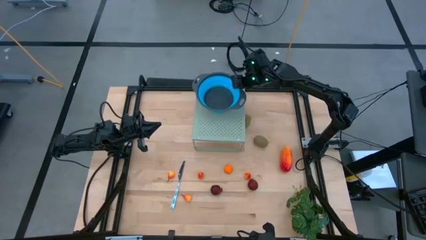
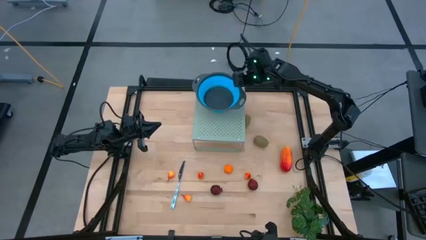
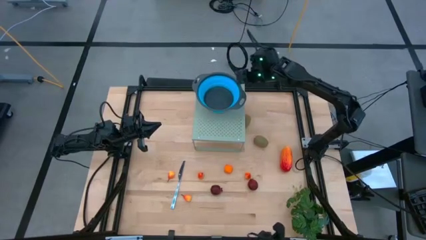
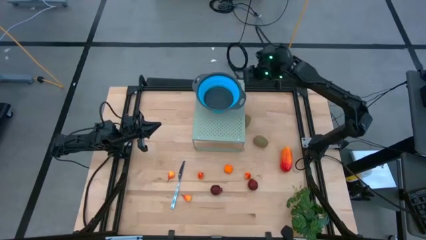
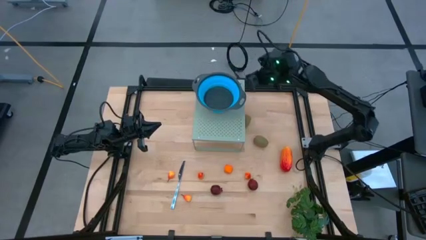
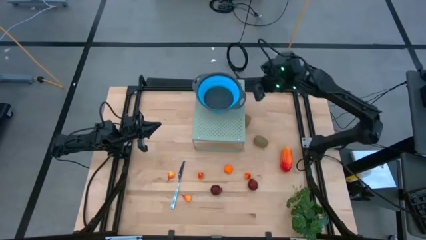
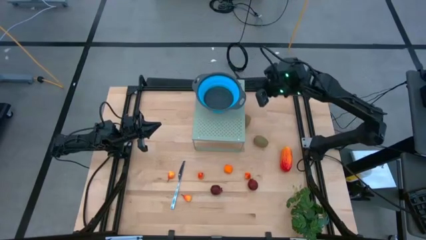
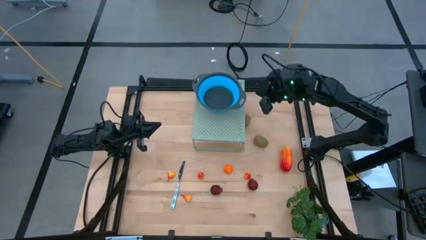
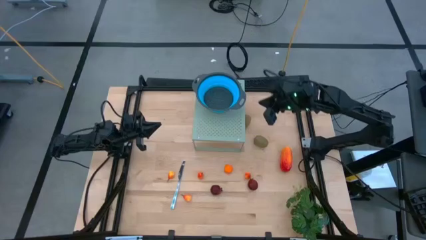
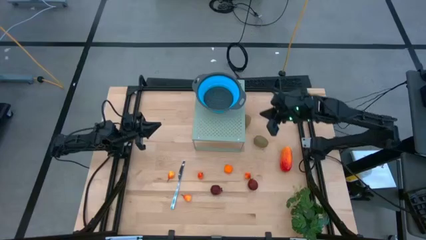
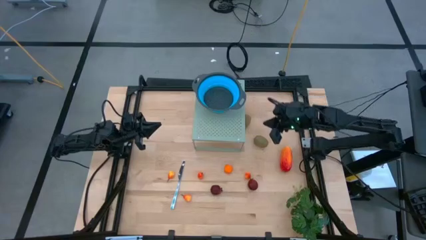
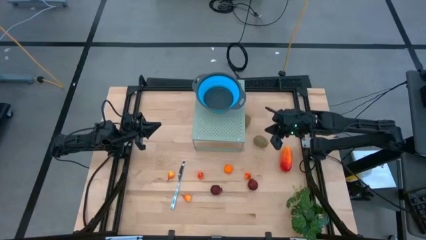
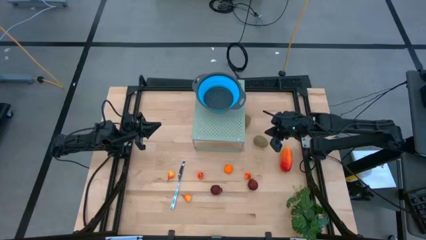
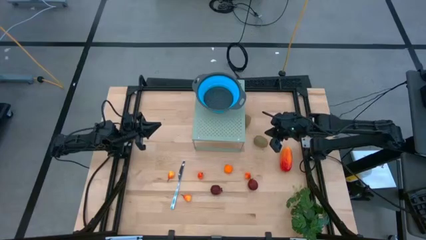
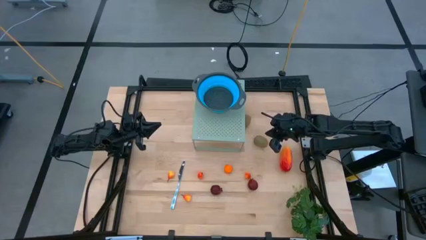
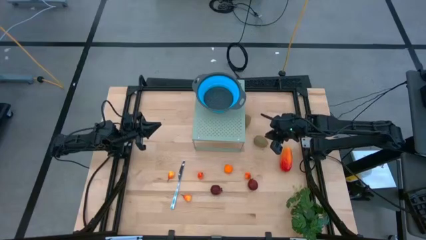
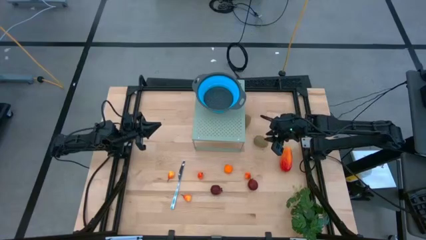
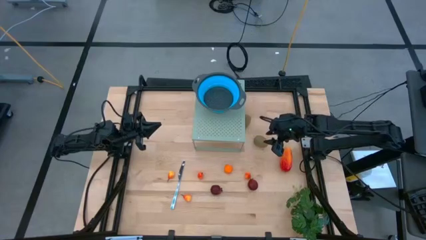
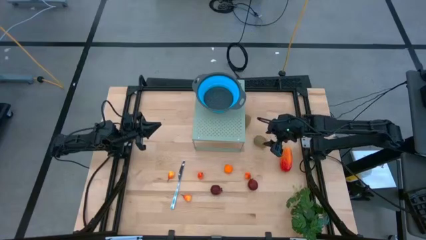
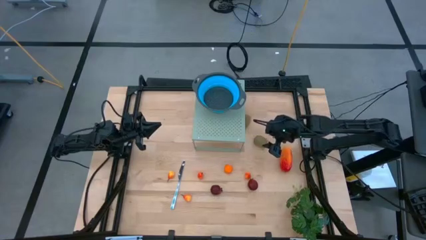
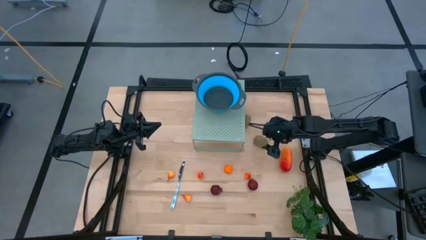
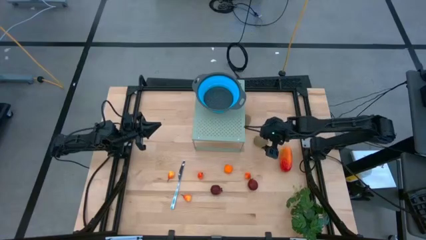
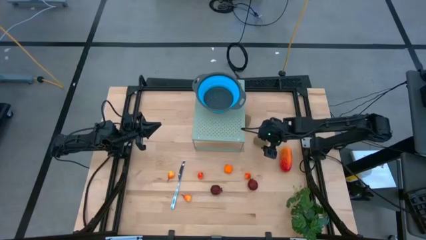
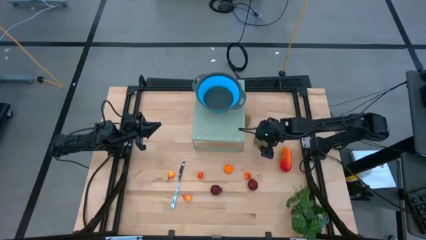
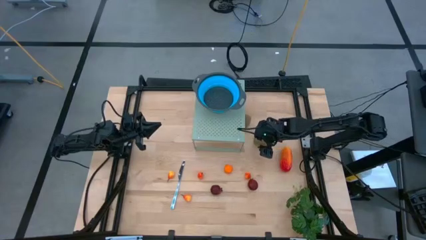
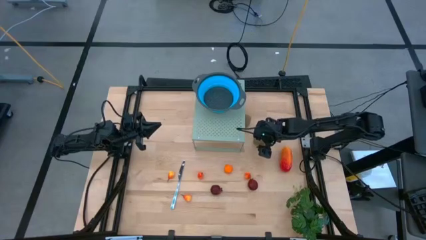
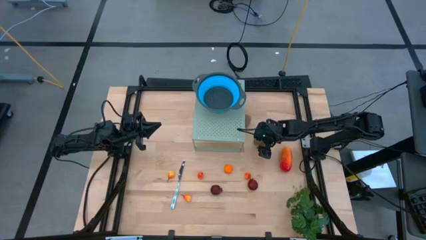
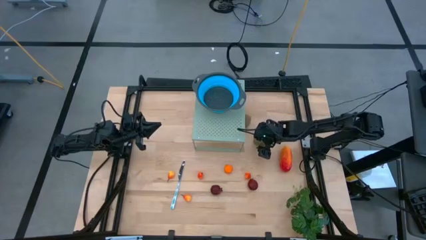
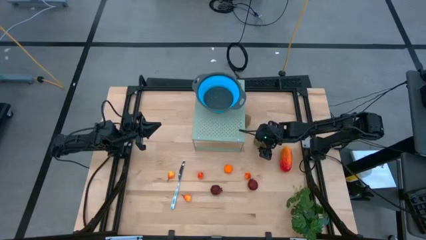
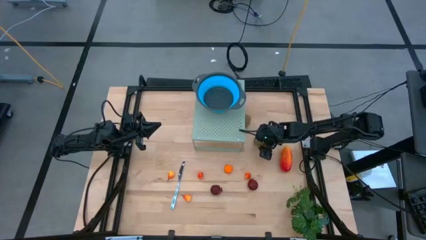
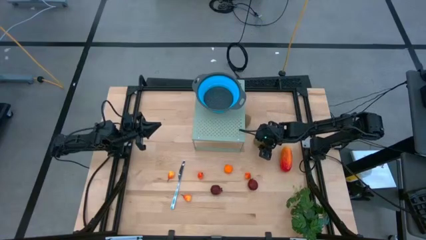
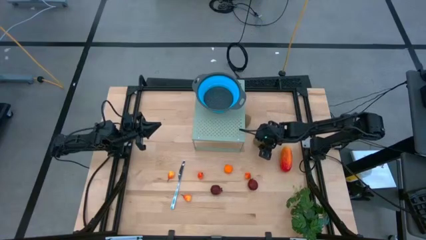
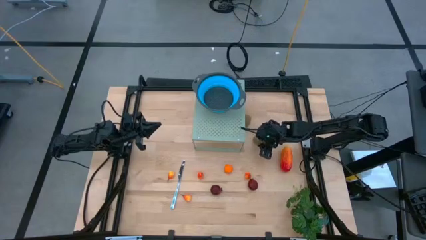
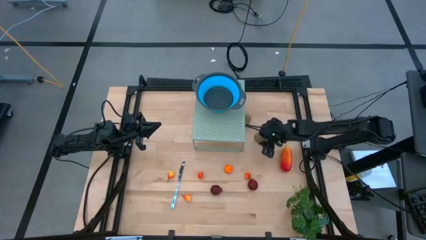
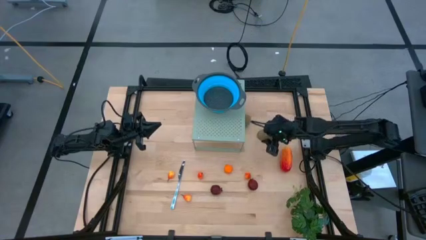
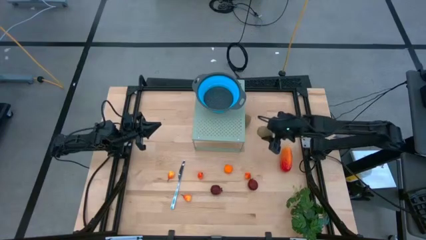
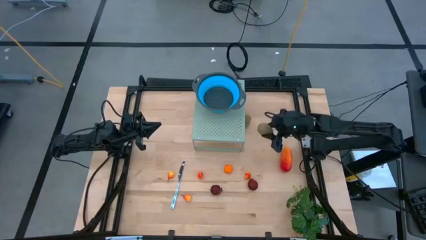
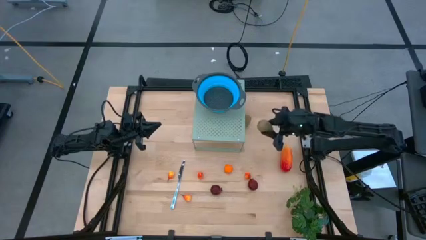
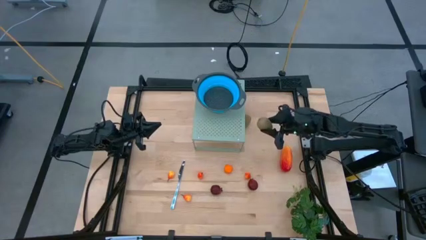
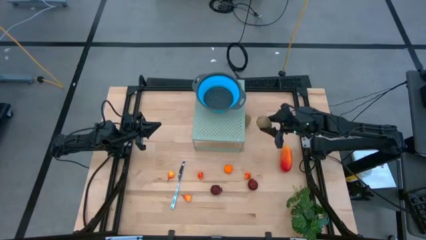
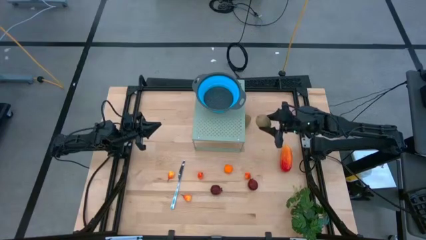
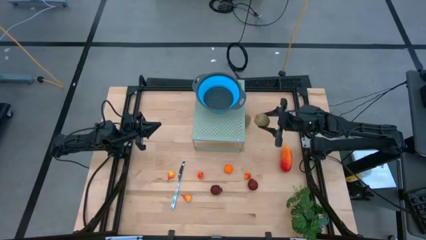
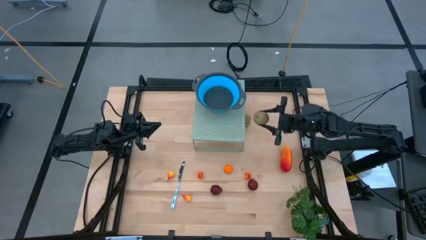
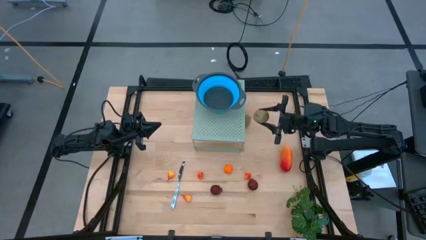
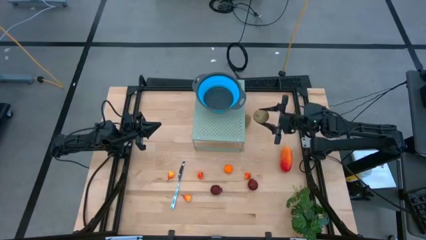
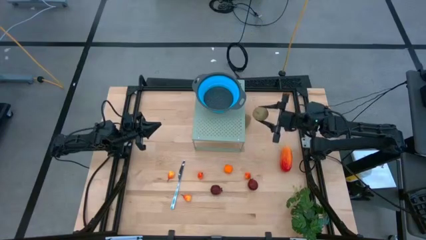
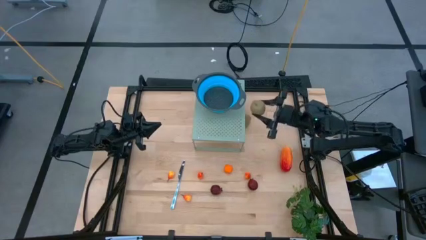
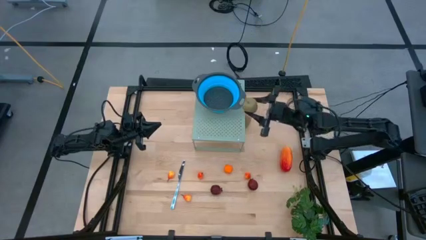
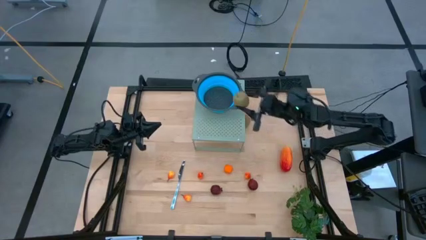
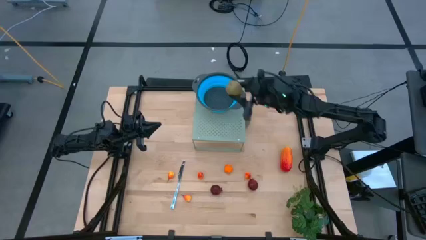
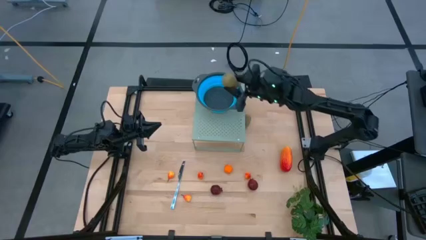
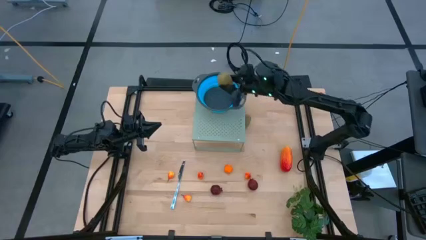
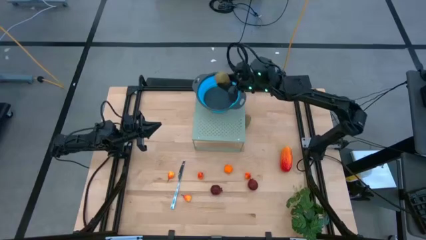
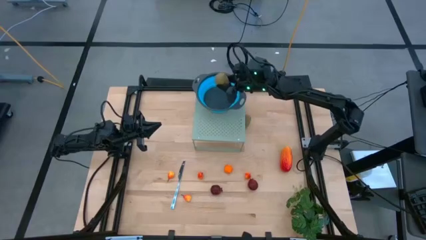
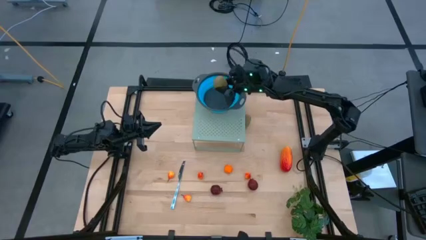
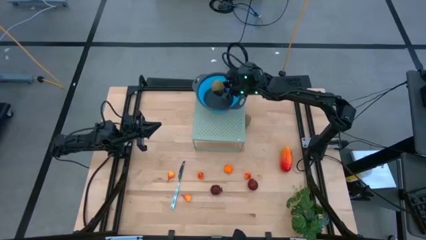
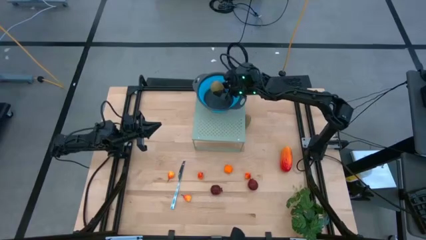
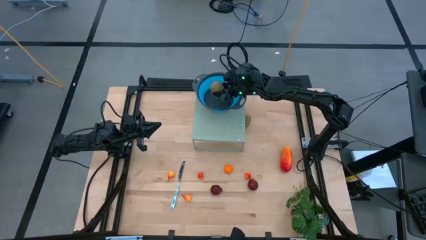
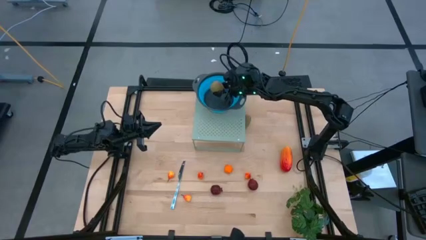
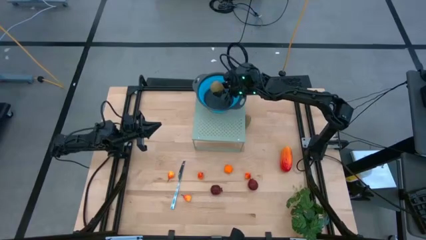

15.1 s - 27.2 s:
Task: Pick & Place Fruit
Put the bottom kiwi into the blue strainer bowl on the shelf
